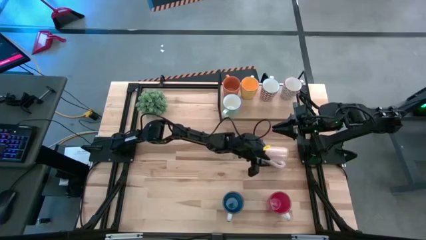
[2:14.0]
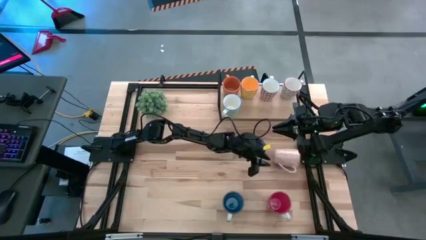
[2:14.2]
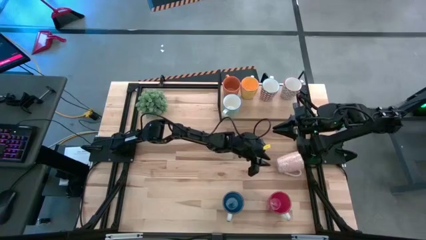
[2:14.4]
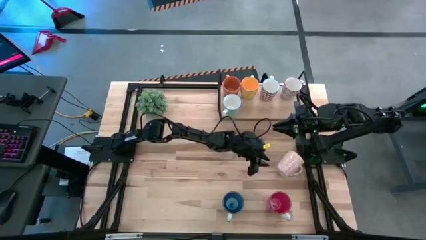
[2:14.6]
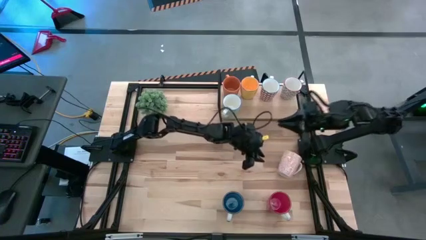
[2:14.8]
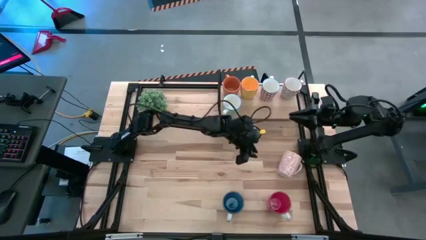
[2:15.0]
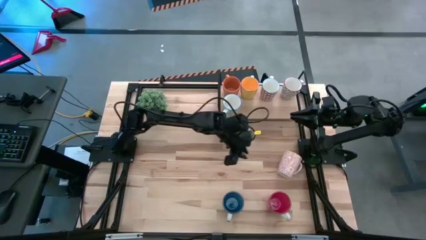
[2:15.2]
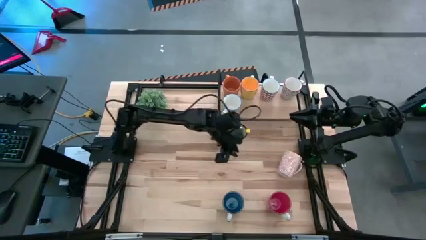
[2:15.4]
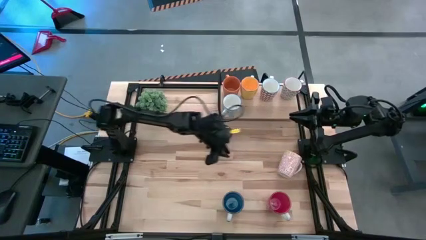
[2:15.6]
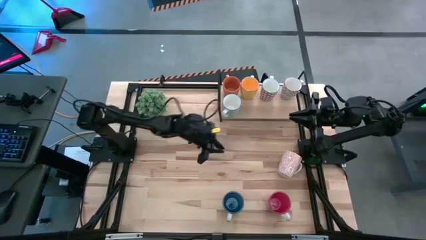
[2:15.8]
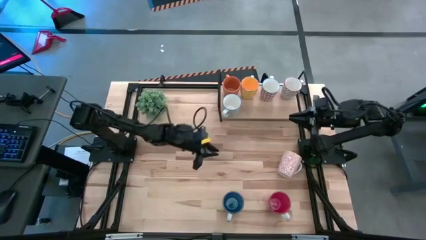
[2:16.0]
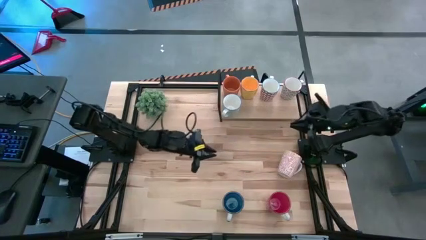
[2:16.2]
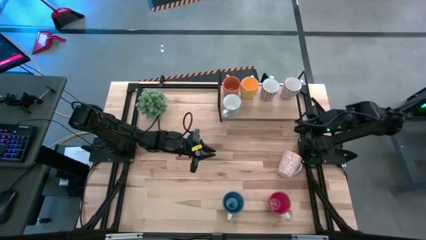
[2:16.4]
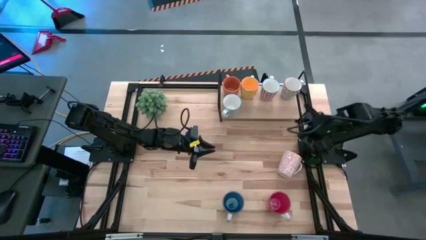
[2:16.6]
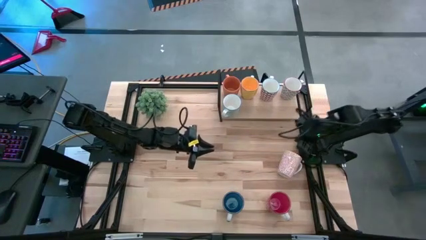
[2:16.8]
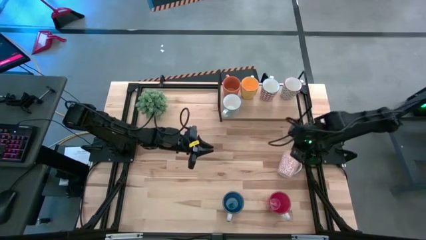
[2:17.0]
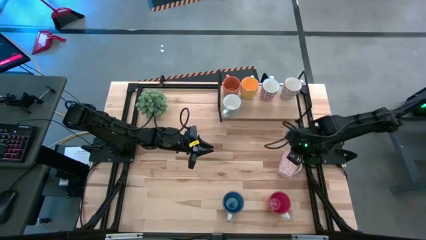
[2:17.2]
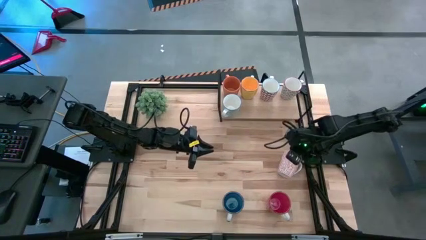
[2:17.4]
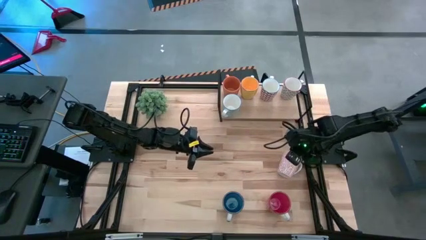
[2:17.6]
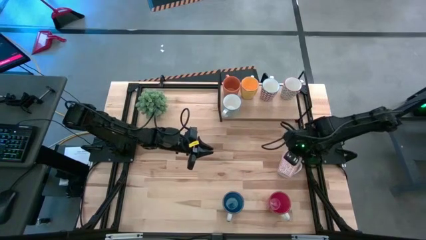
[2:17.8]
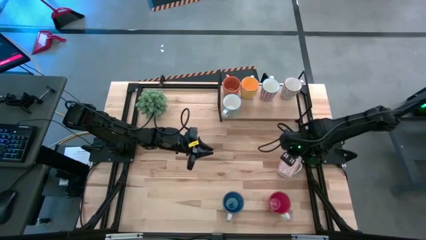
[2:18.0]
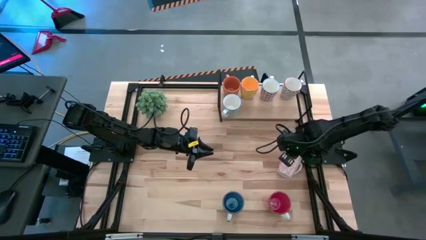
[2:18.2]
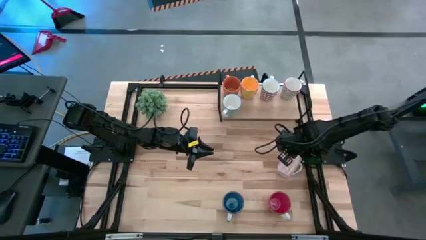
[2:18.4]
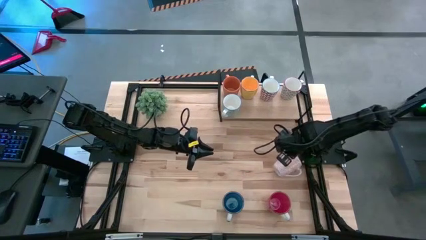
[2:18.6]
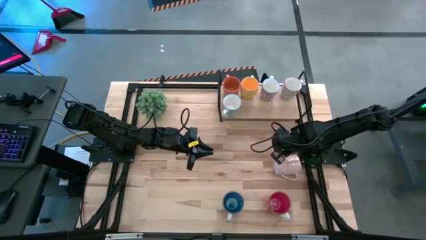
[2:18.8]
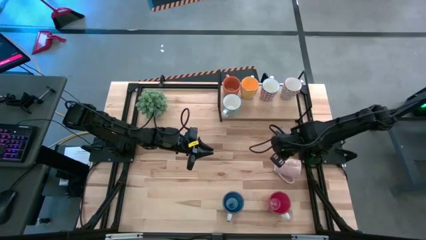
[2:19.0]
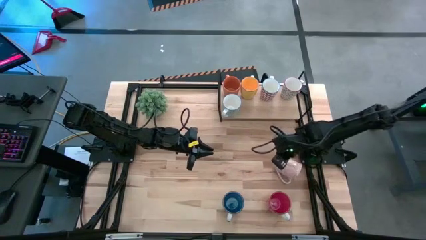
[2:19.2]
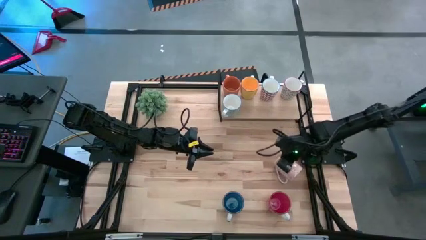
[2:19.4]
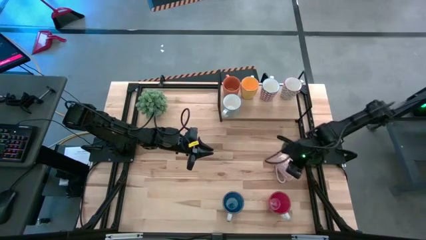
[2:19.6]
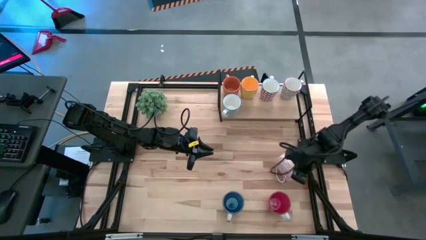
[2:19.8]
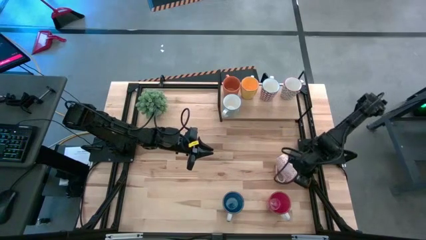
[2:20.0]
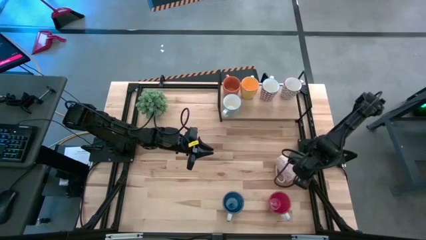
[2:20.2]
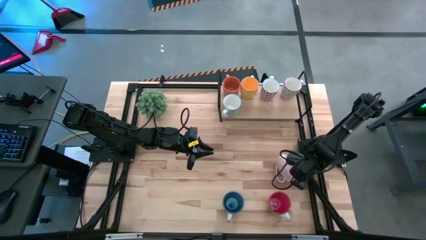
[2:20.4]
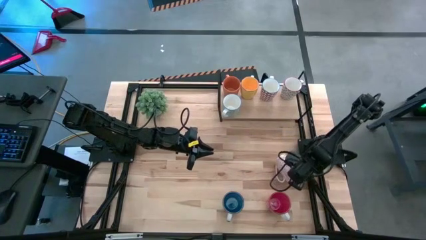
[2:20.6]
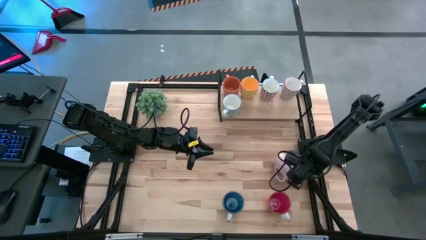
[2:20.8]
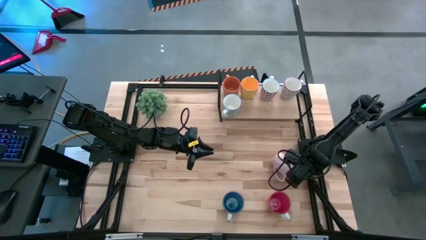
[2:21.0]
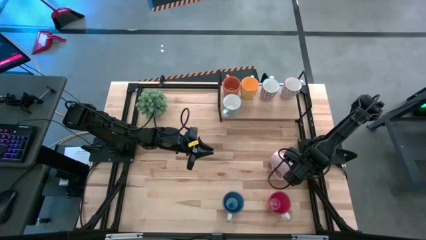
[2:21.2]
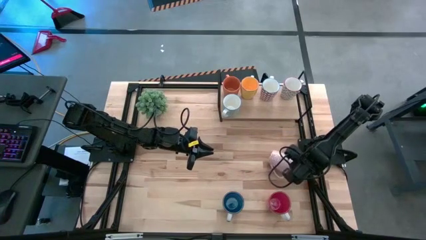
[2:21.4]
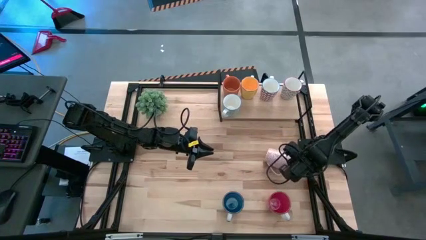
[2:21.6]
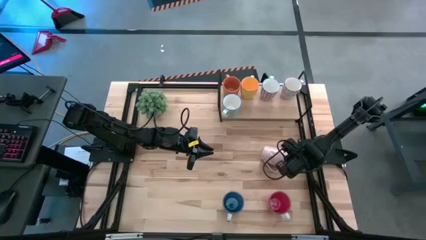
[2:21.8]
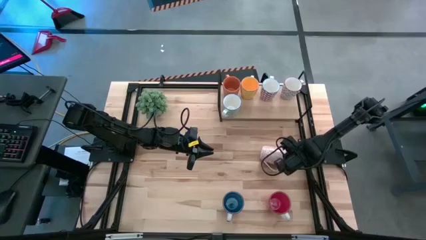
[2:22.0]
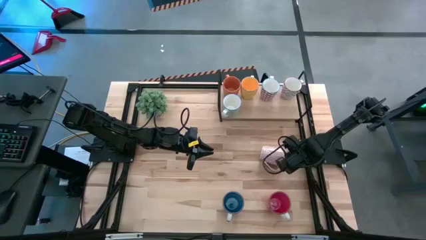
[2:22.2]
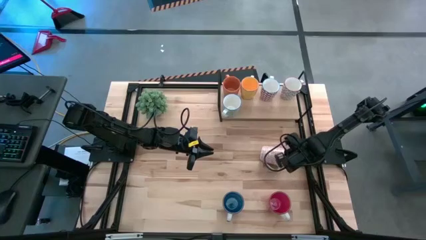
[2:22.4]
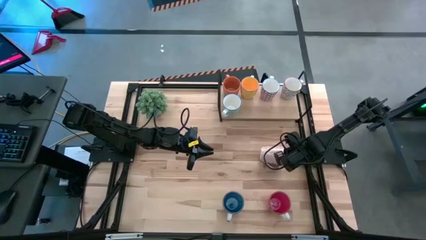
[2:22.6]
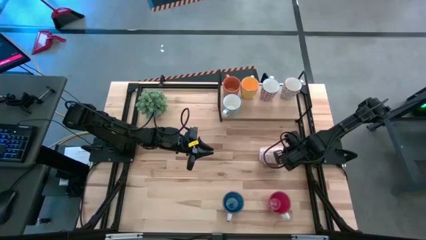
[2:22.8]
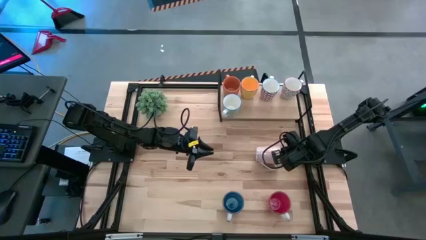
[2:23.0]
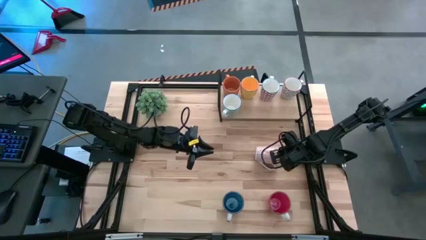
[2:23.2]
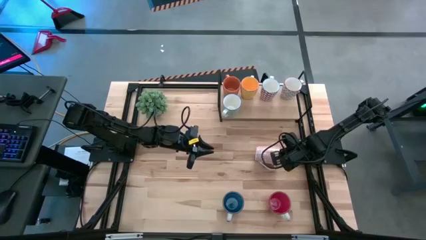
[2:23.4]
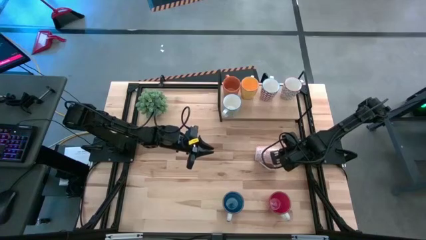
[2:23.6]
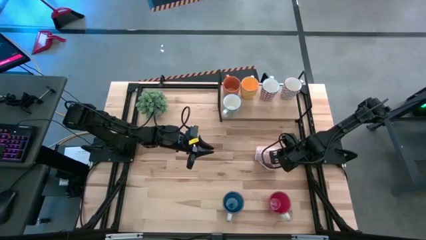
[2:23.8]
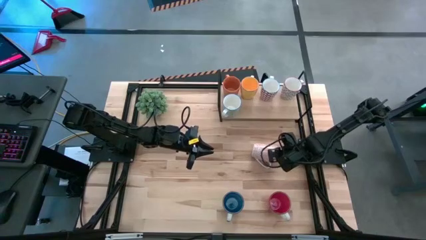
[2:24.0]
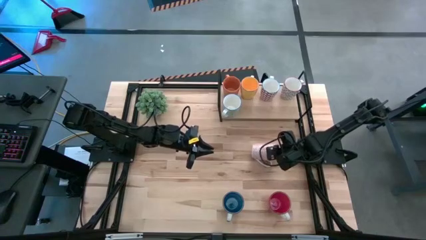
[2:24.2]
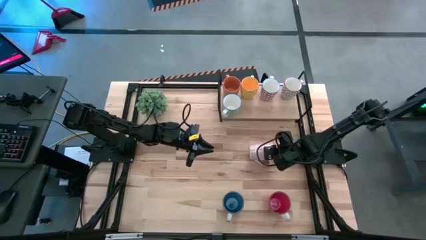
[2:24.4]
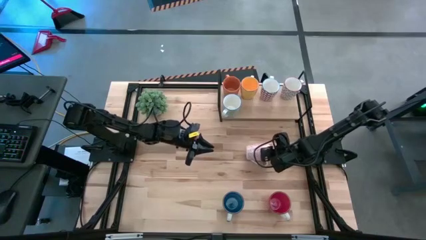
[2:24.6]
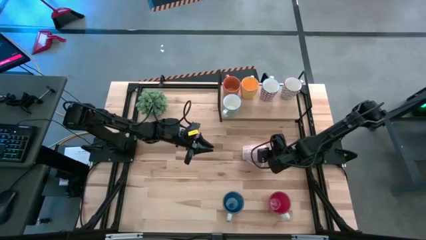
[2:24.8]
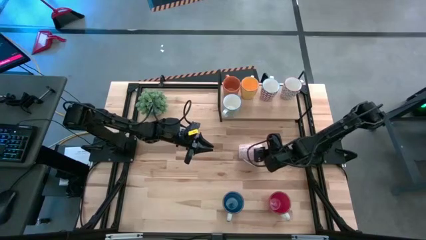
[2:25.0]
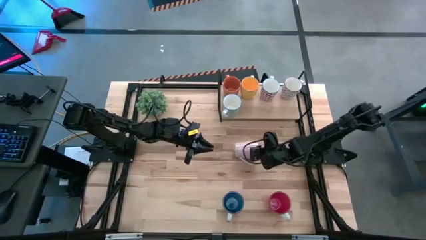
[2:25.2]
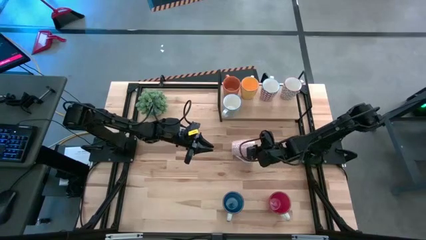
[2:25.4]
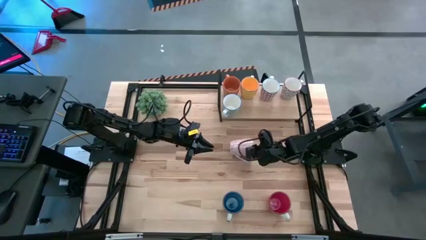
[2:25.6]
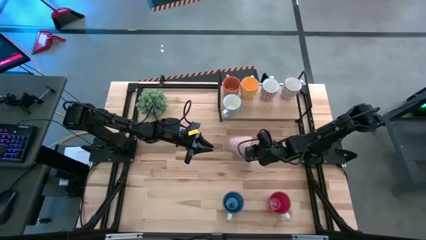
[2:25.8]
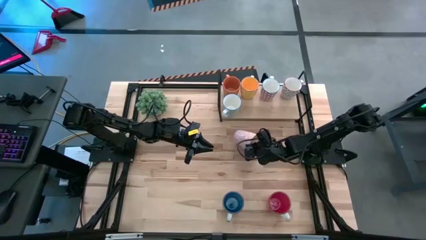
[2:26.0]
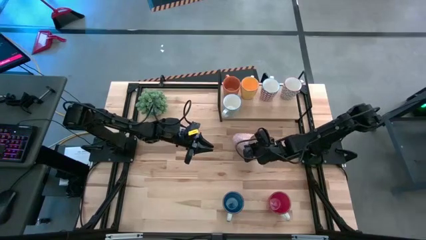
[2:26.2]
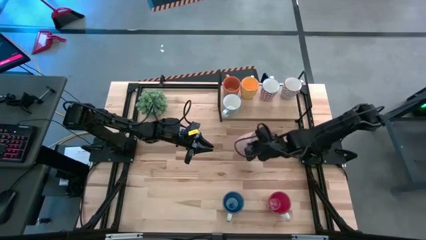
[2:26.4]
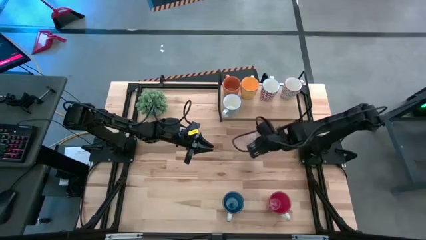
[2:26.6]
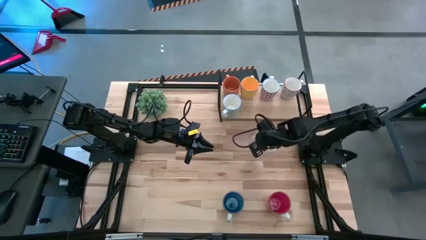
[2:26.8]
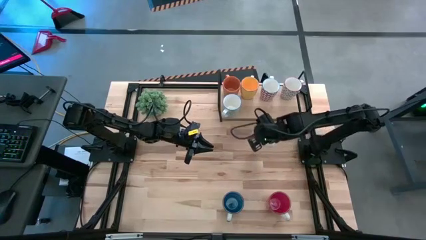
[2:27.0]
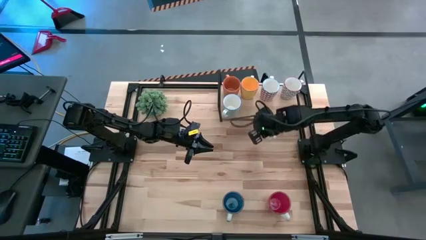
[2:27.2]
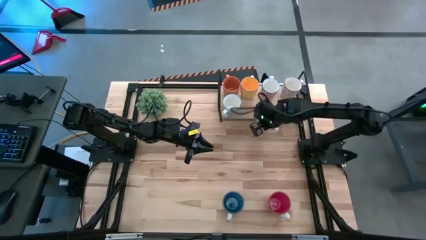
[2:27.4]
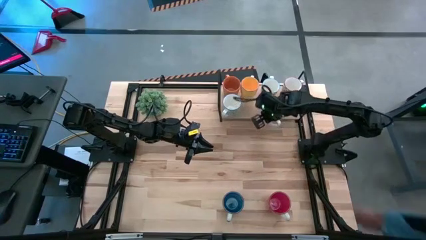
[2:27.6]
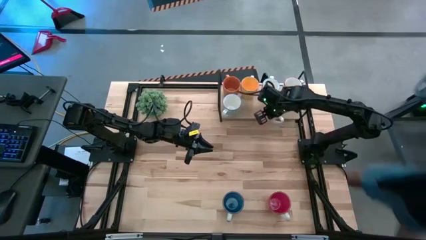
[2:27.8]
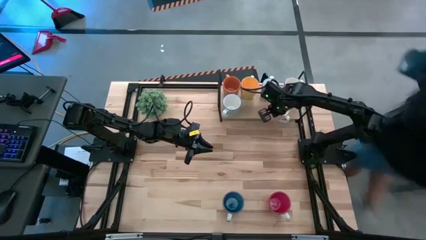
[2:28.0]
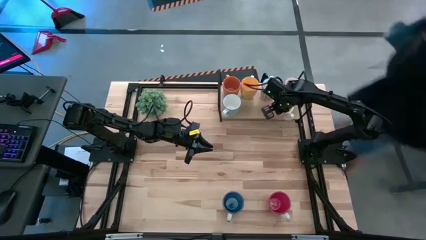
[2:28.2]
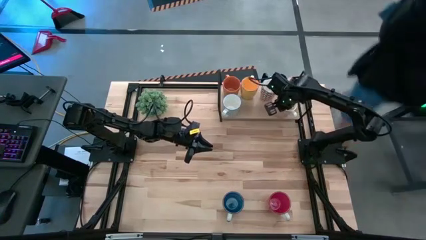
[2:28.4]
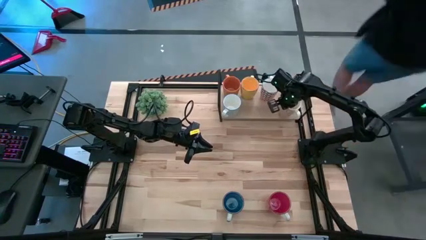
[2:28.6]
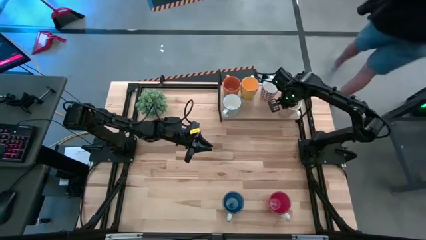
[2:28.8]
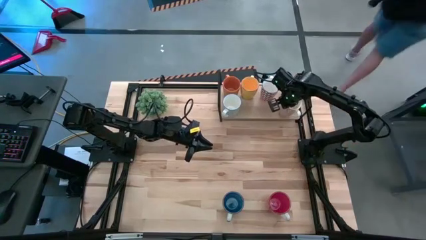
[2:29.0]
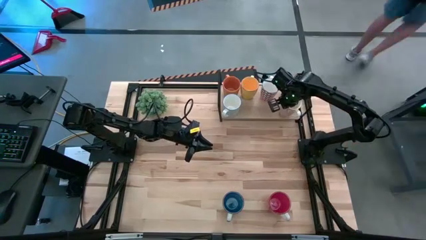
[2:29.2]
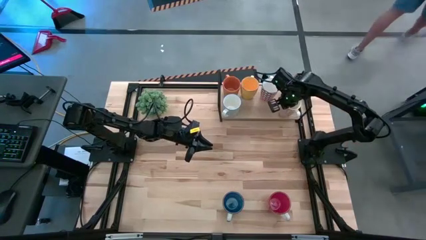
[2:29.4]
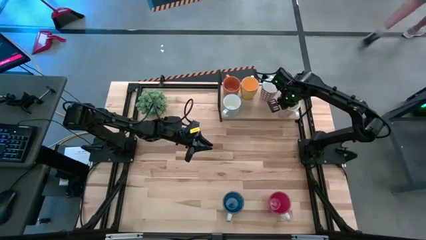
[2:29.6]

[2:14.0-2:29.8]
Task: Place coffee mugs
Put the orange patterned mug on the shelf
